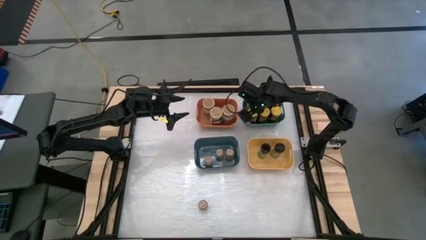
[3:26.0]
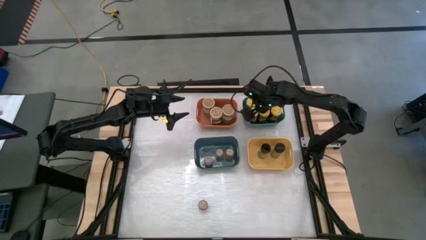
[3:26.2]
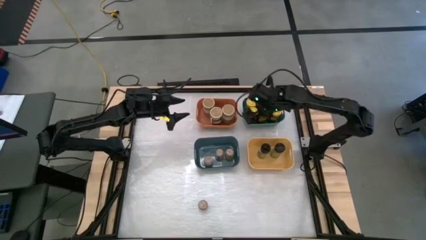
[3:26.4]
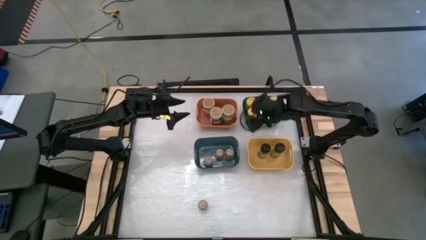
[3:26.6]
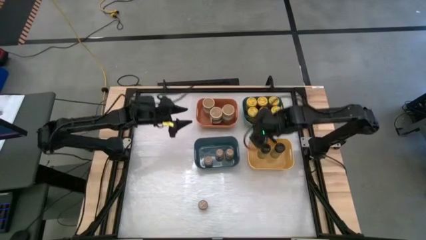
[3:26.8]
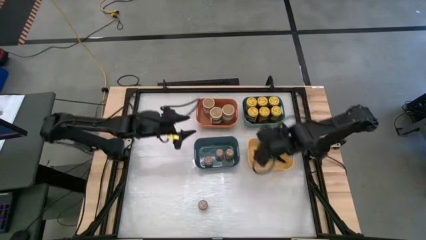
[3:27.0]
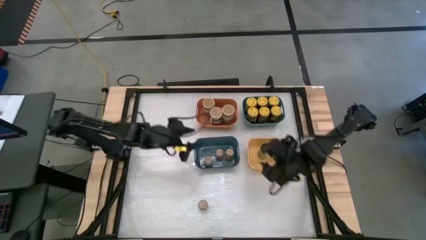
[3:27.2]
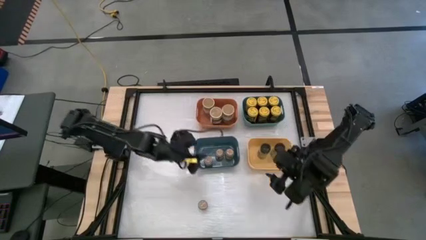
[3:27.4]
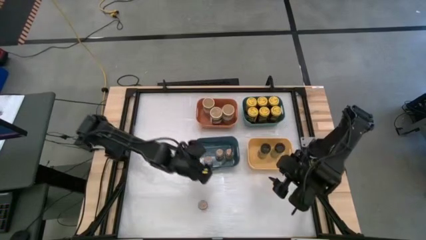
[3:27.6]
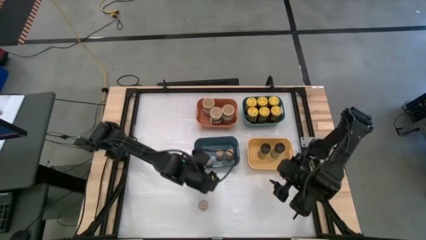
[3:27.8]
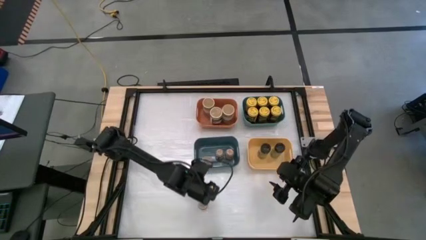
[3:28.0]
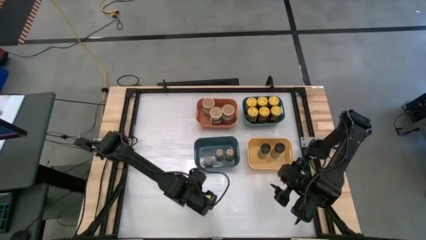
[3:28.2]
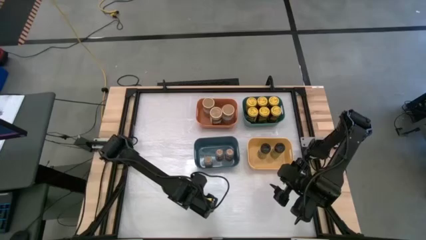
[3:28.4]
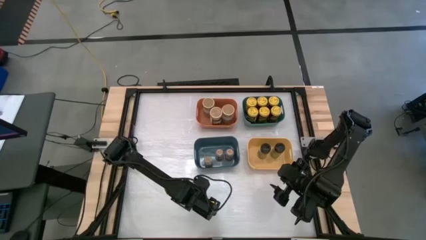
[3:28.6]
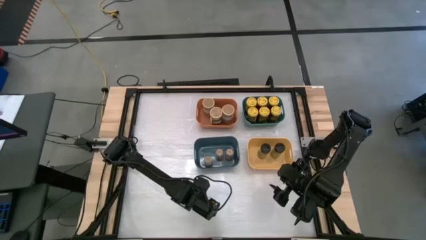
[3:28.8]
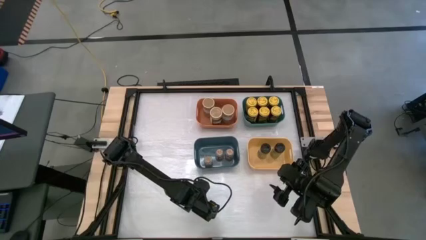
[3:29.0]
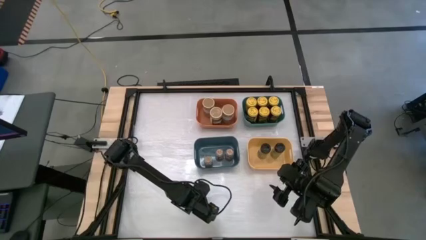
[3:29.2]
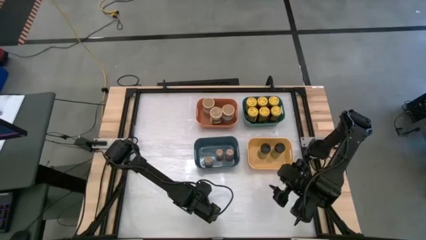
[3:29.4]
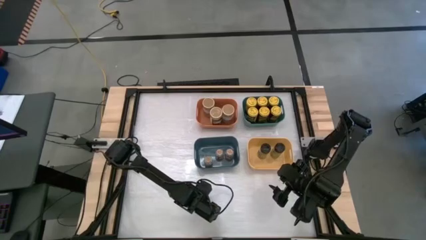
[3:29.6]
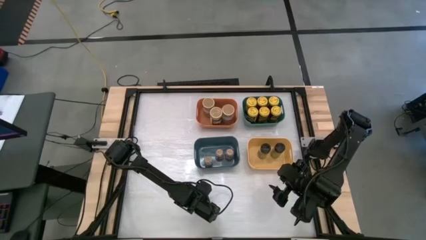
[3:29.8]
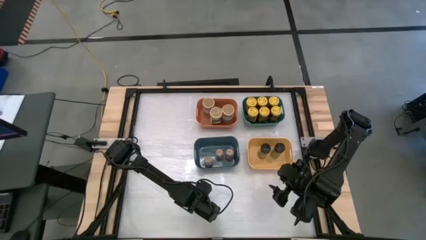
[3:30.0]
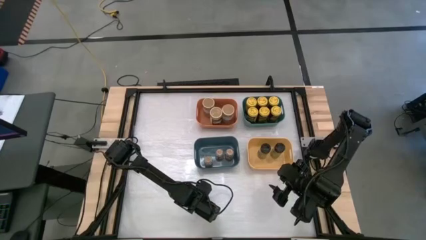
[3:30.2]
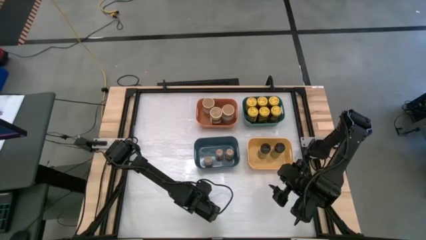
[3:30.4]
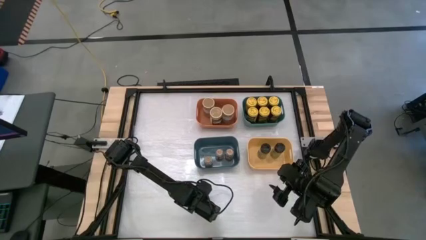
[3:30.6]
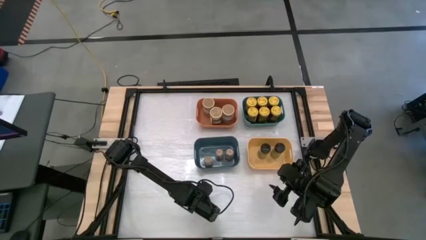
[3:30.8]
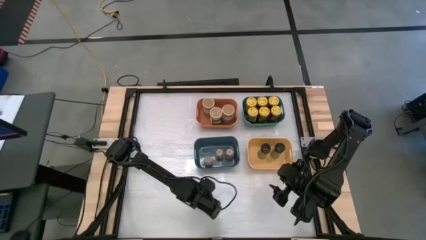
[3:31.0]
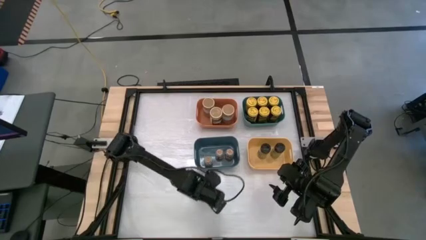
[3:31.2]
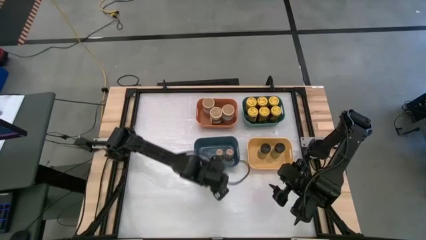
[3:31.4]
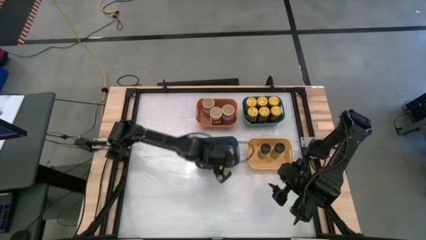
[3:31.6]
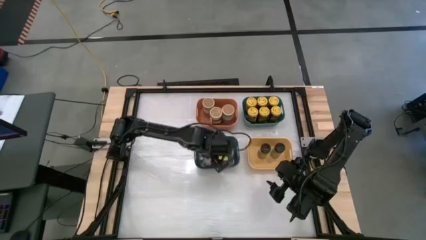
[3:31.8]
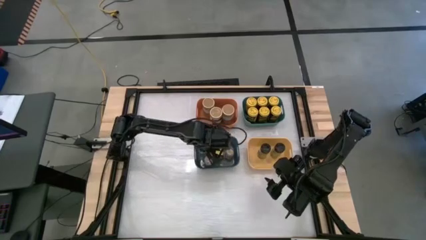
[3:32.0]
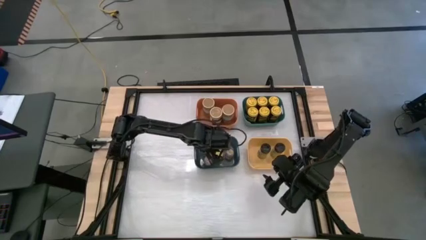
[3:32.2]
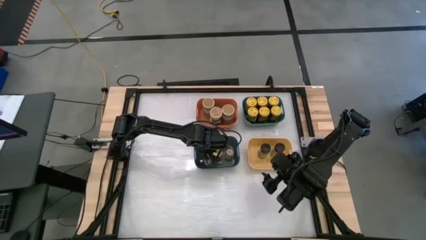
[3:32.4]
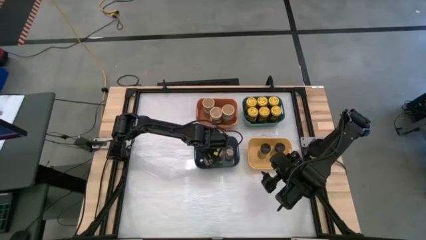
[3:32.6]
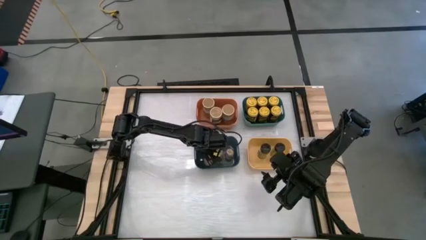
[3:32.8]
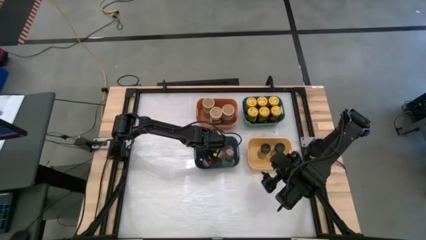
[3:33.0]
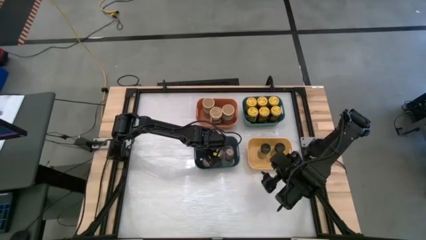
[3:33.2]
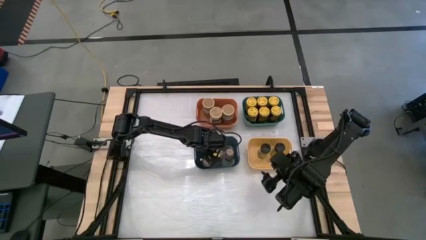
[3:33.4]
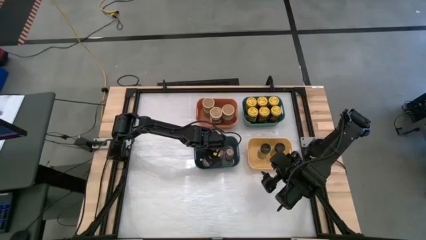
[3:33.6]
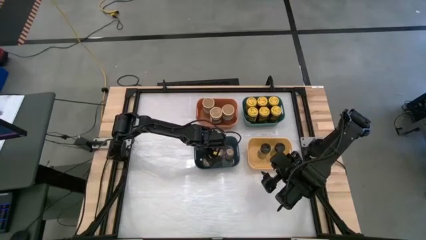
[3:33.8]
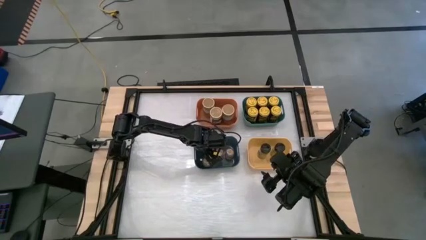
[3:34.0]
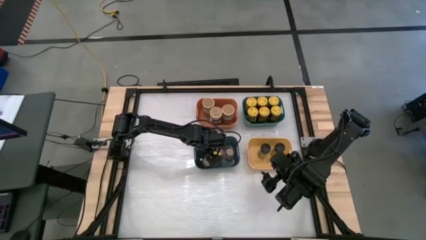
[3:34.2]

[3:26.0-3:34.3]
Task: Sort spices by type
Put the brown spice bottle into the blue bin

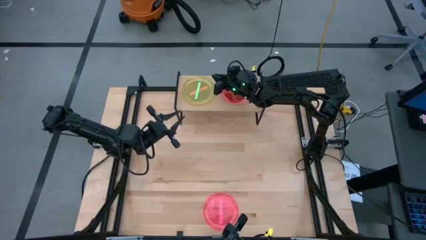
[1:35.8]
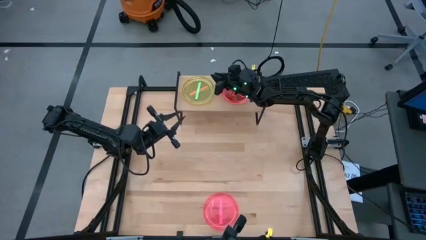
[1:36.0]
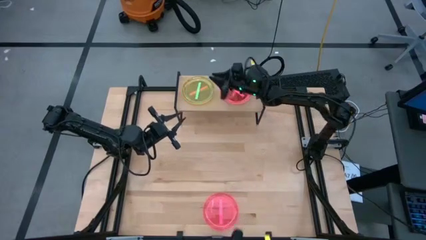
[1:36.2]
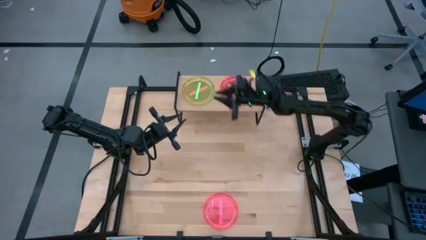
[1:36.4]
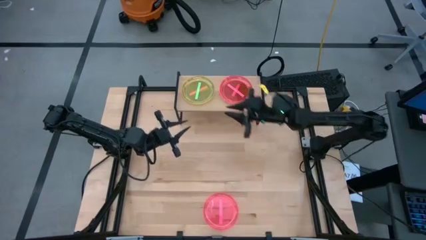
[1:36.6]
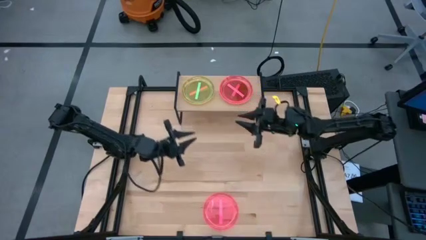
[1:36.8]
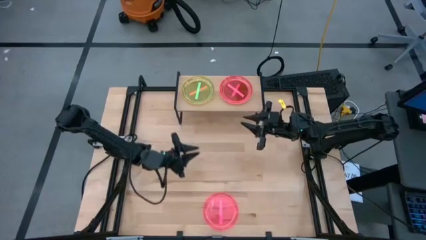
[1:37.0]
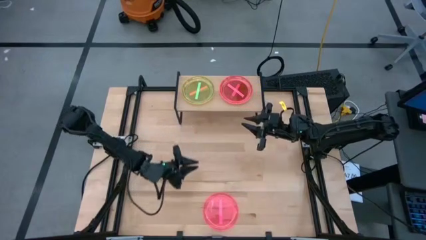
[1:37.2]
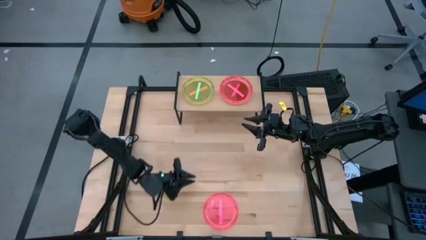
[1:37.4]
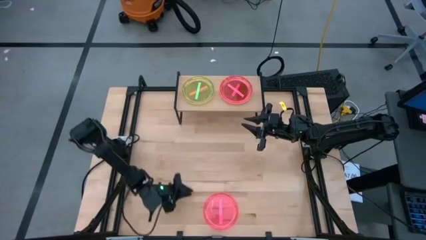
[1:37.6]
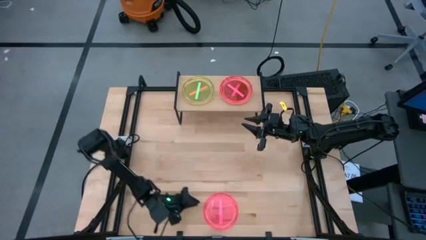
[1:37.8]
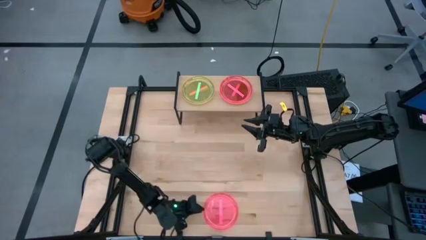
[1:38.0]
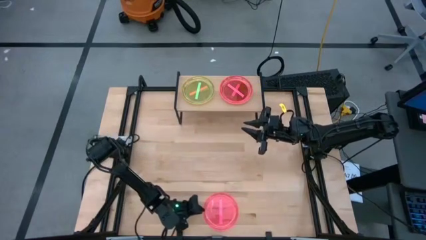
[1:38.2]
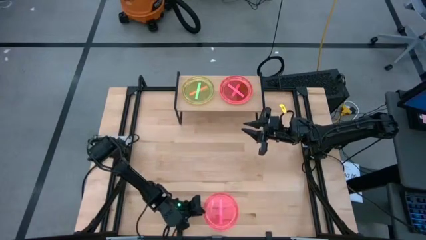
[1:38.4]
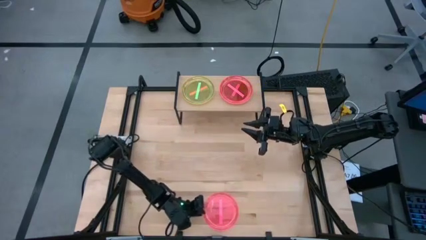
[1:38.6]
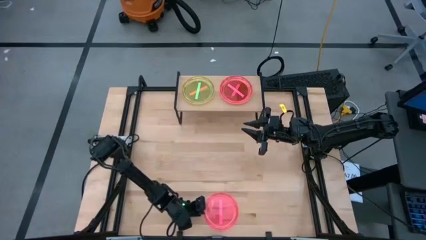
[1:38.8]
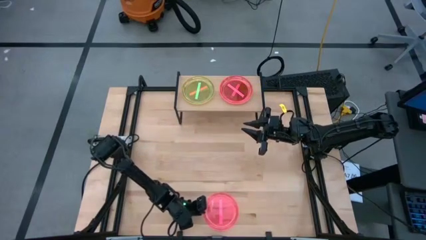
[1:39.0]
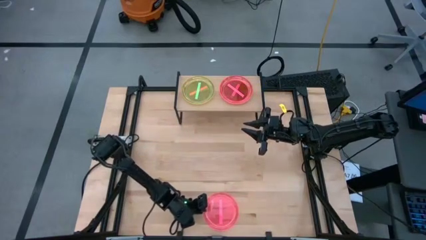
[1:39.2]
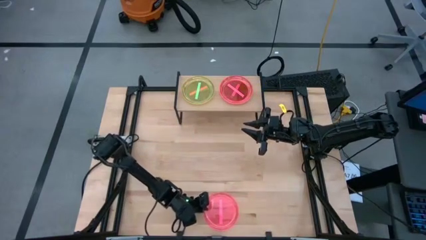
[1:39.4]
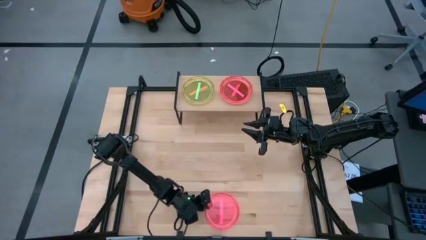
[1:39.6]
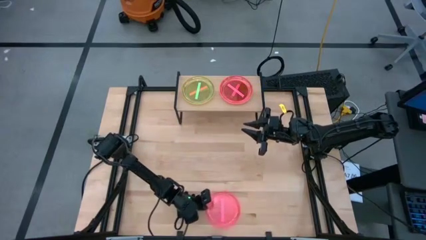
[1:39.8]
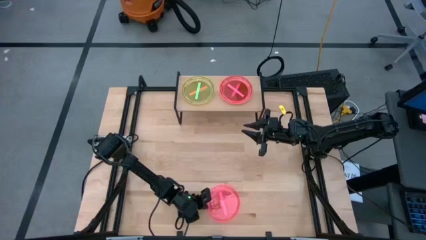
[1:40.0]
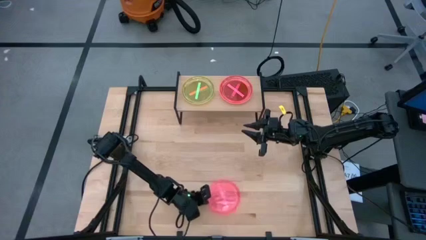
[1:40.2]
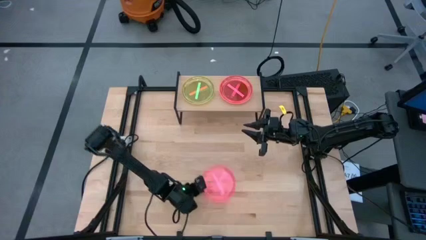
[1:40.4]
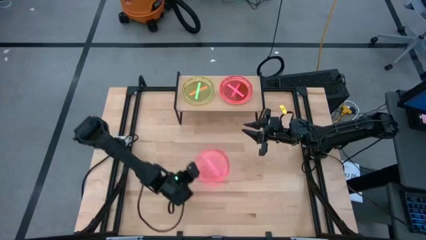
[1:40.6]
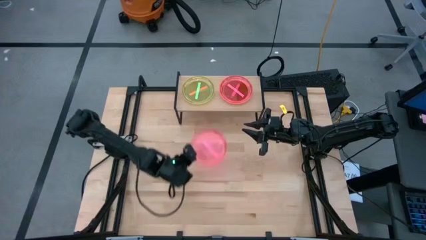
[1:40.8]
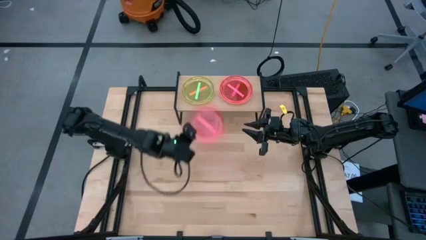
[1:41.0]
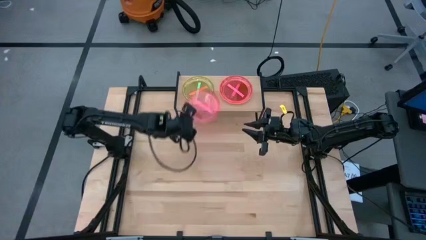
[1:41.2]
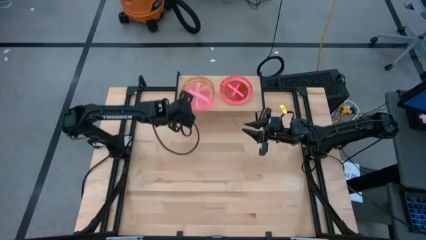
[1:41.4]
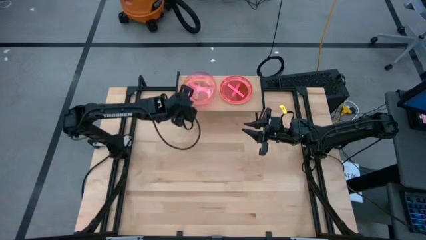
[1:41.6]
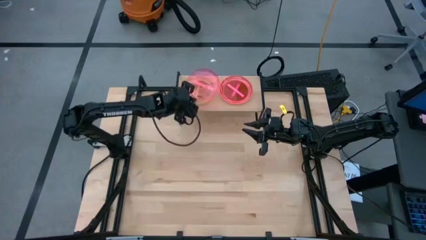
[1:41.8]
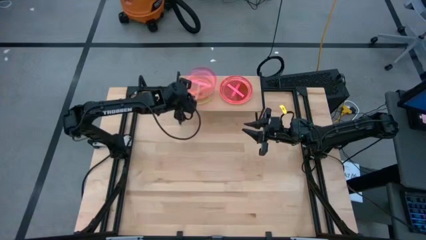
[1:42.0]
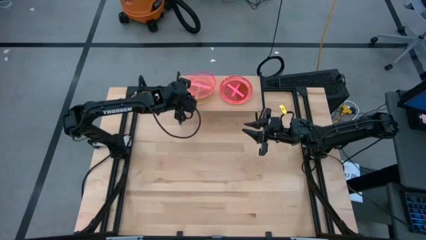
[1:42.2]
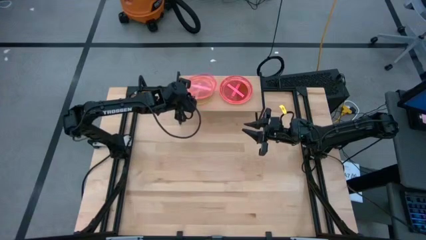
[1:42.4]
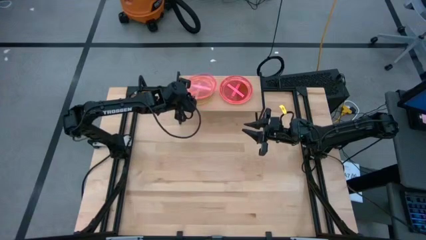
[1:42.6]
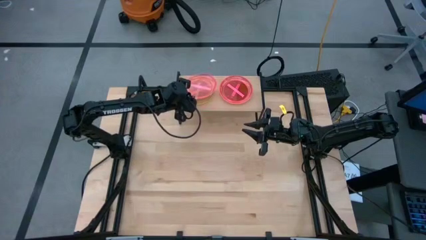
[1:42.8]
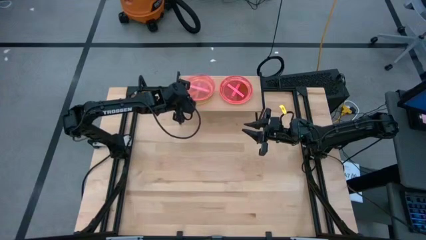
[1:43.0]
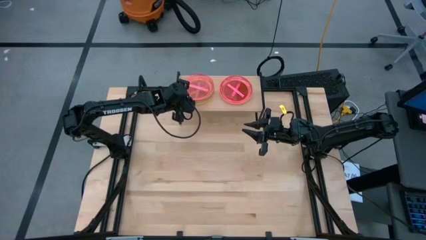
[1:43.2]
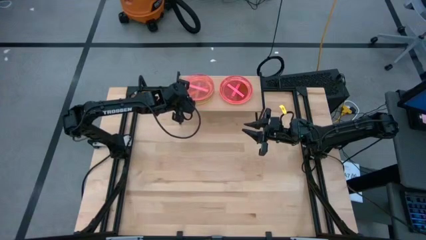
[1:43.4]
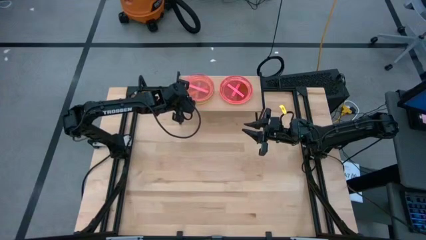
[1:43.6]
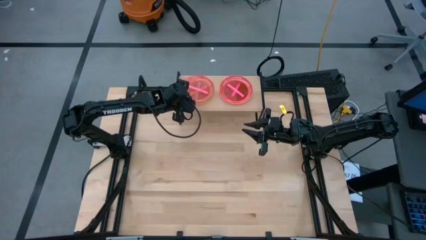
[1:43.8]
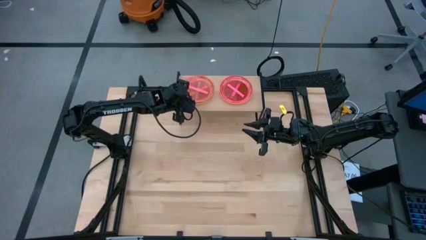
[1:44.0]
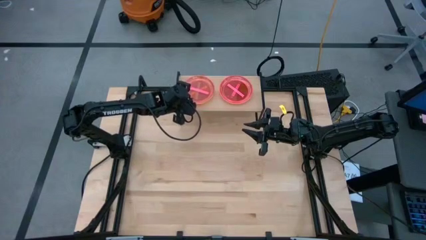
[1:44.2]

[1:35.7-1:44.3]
Task: Place and stack plates onto a shelf
Stack the pink plate on top of the green plate on the shelf
